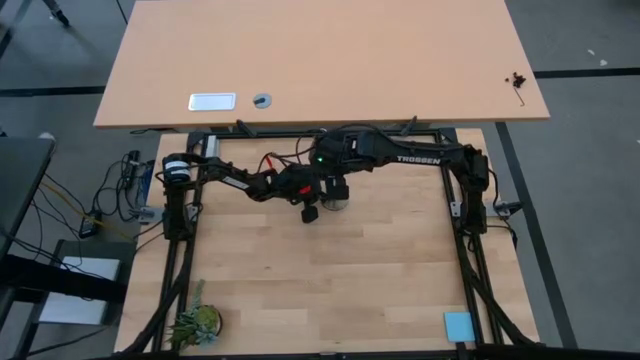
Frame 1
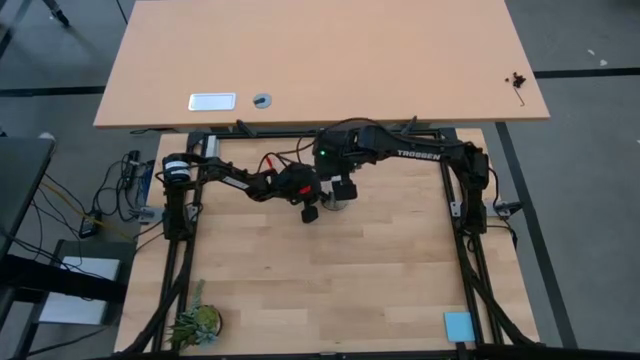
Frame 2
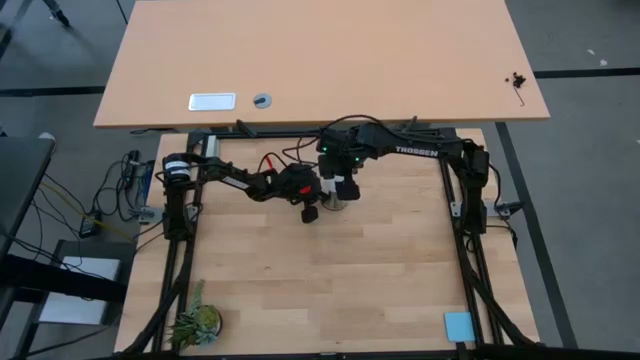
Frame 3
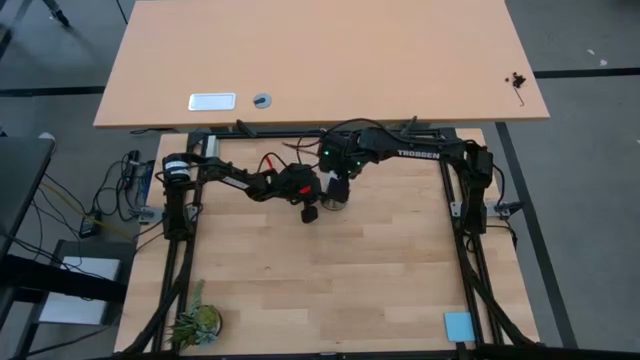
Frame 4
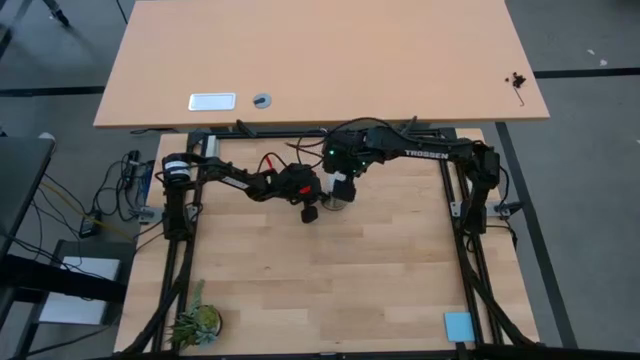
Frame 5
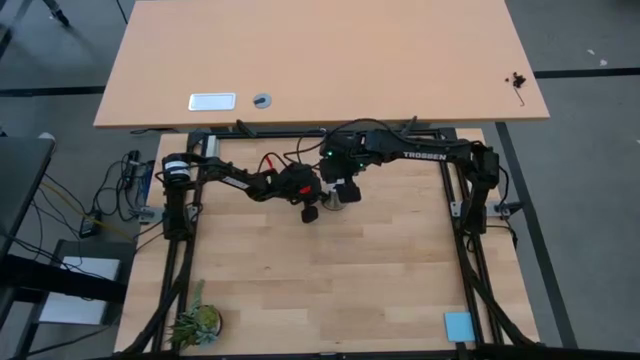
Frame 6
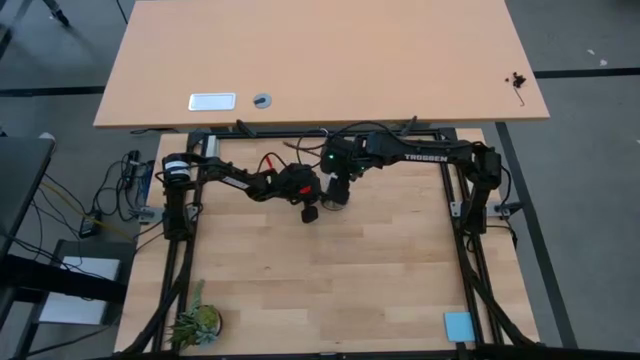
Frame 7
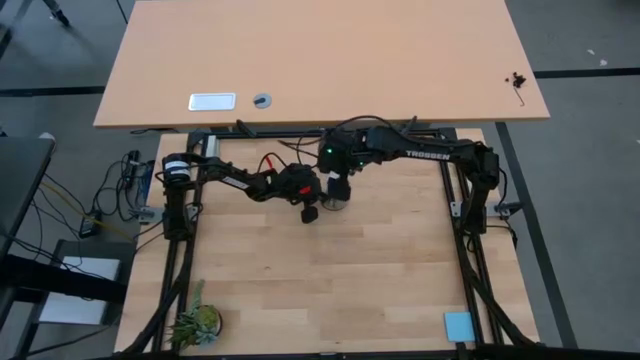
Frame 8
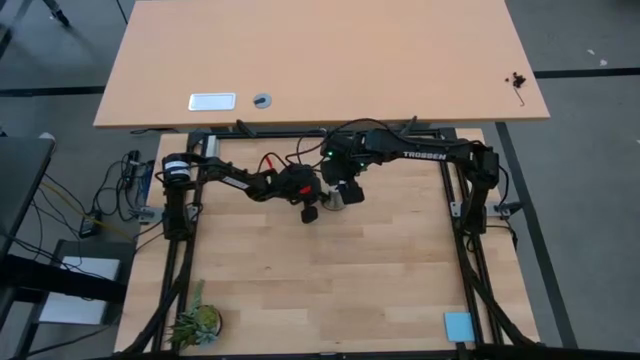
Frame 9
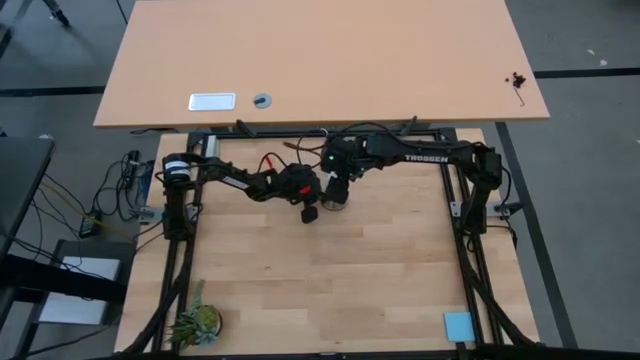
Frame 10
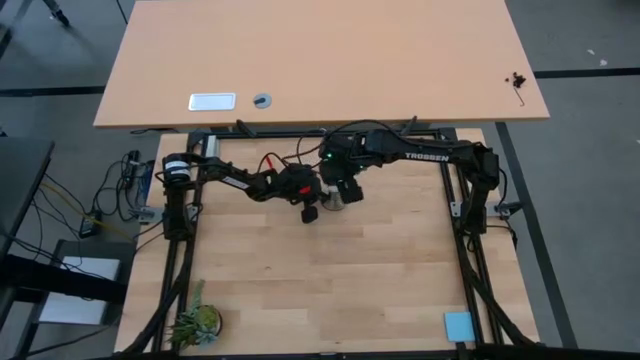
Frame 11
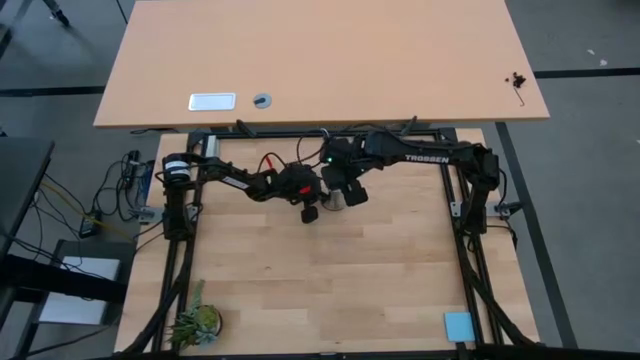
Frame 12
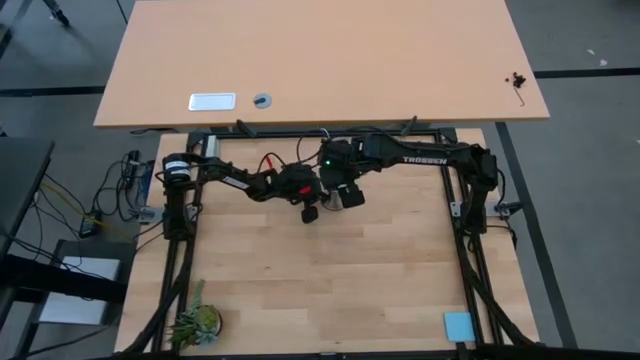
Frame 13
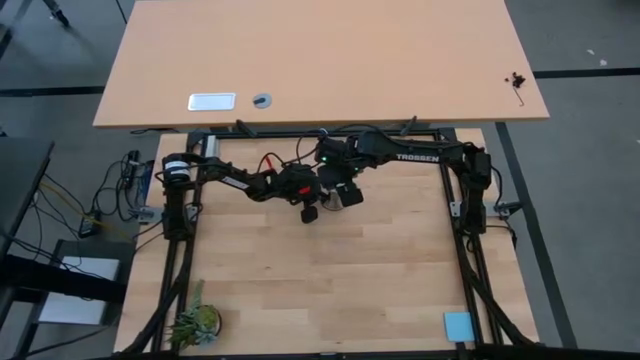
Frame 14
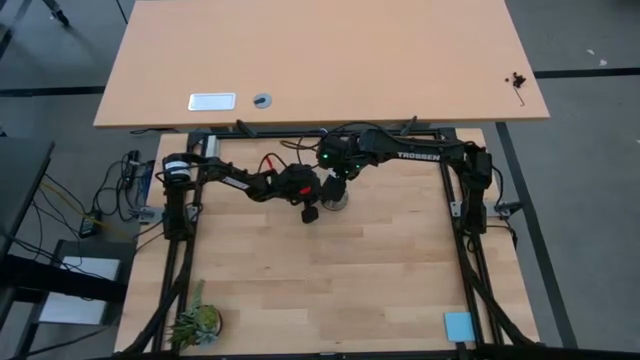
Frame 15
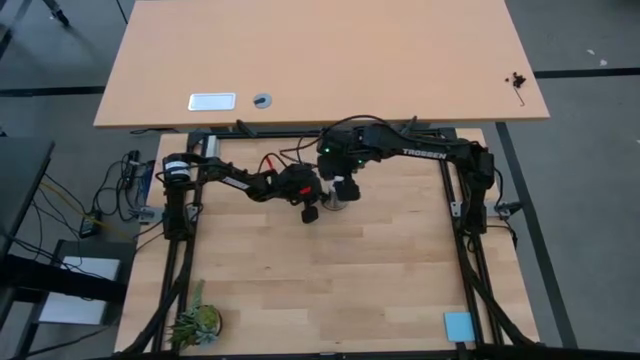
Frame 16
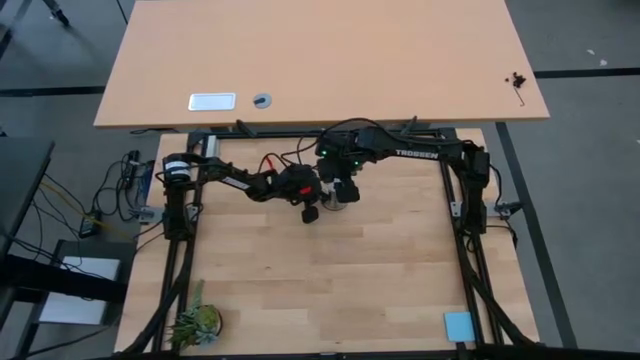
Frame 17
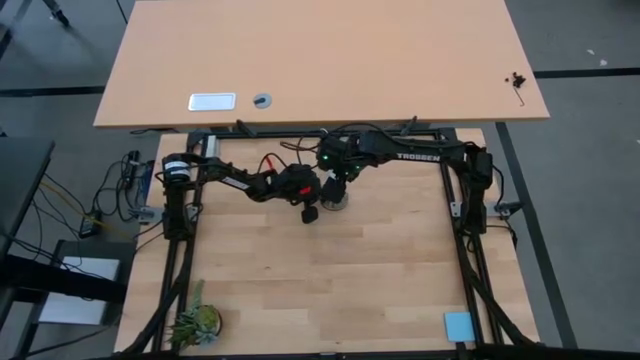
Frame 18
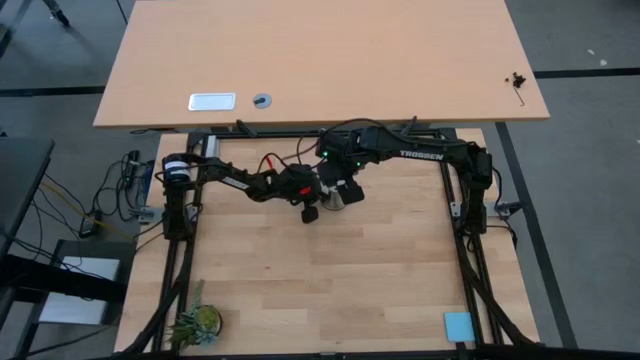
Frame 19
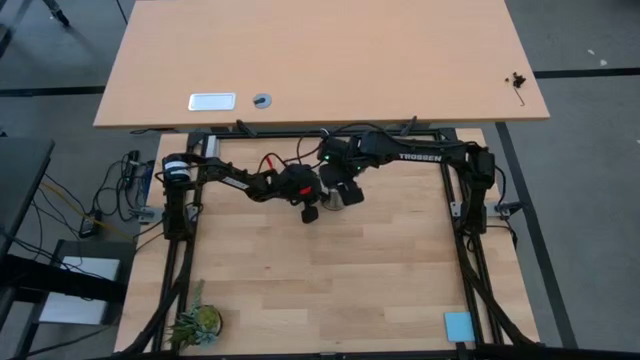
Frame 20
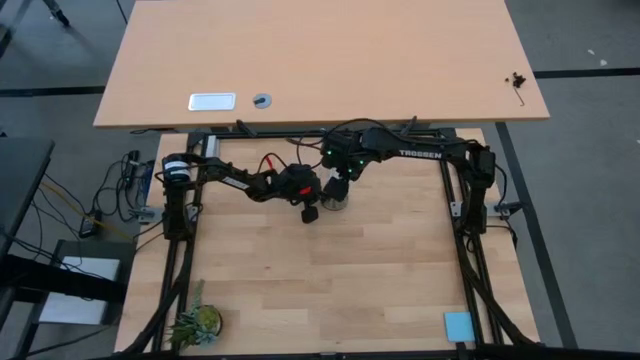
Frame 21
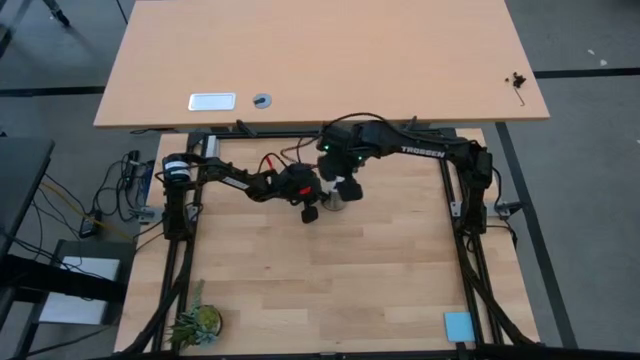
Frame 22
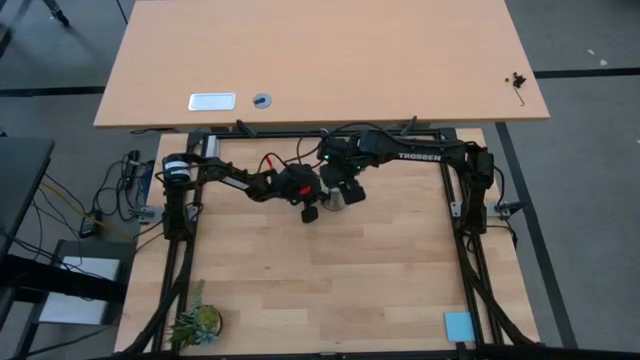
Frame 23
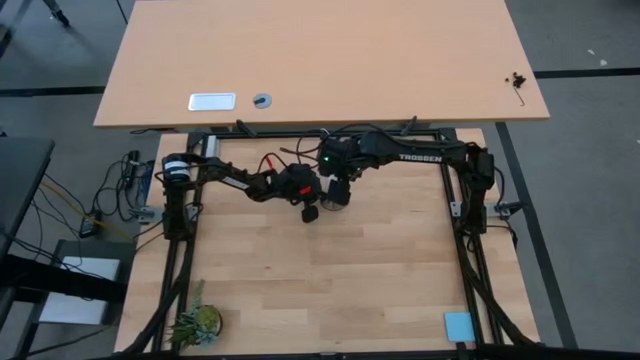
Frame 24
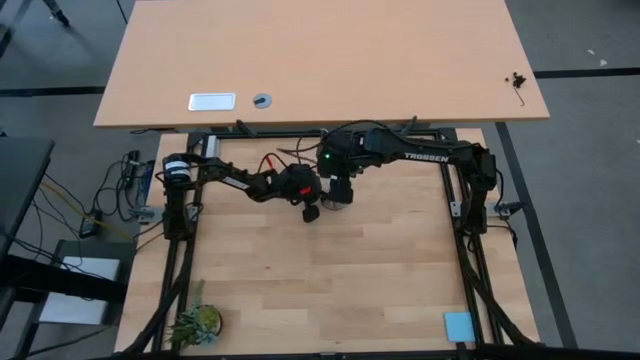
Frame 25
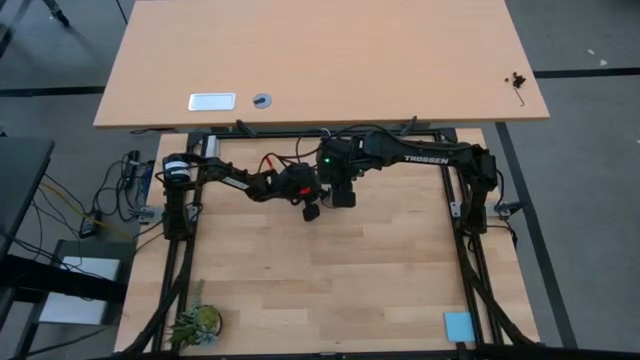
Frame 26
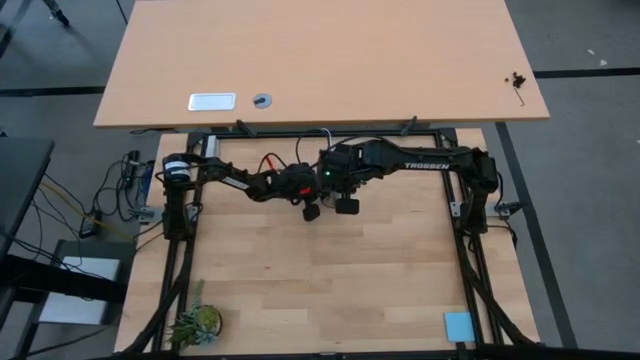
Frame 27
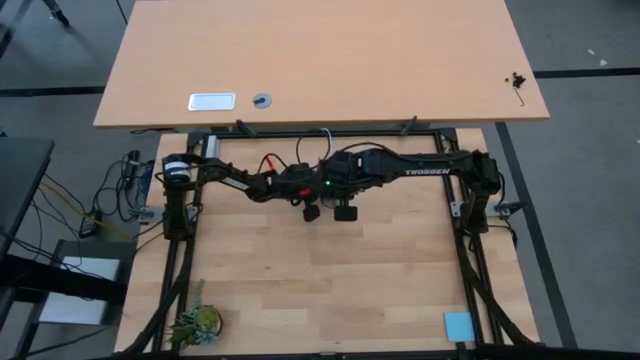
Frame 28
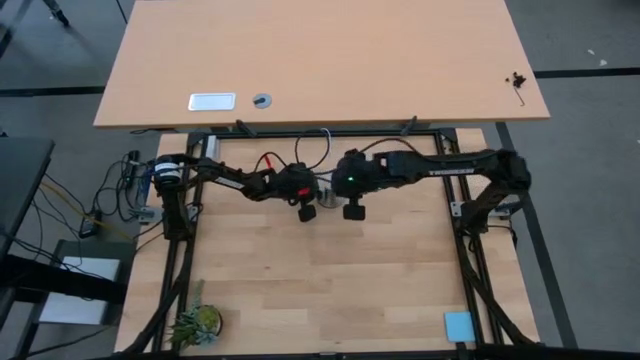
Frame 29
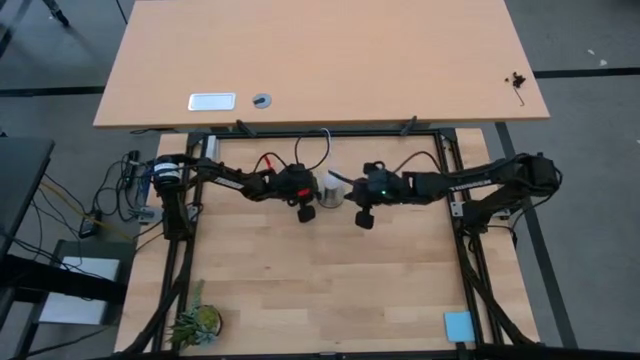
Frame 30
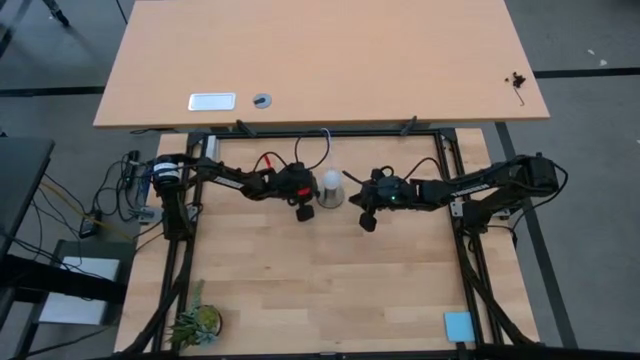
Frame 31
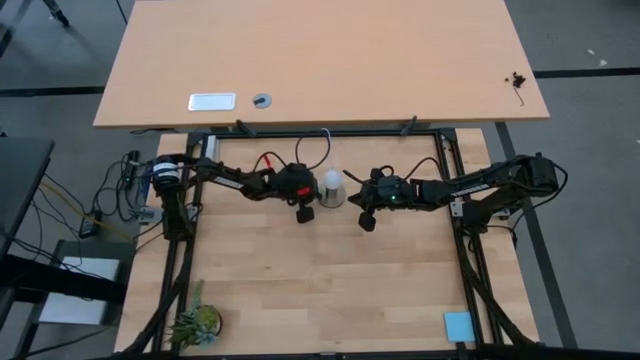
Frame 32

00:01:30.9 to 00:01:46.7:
Task: Screw lightbulb
Insert the white lightbulb into the gold lamp

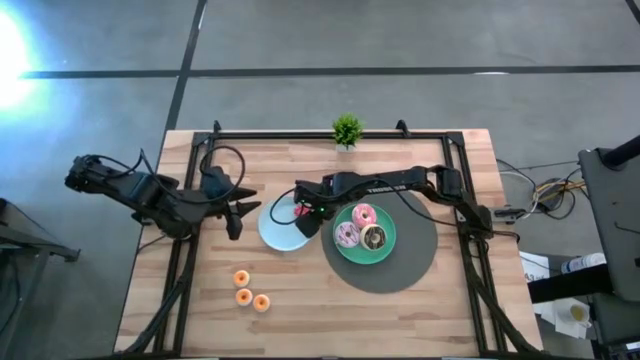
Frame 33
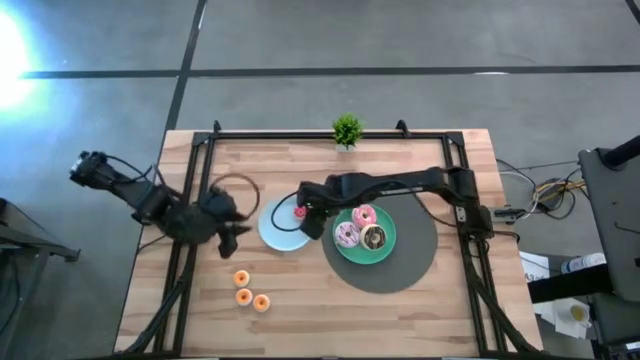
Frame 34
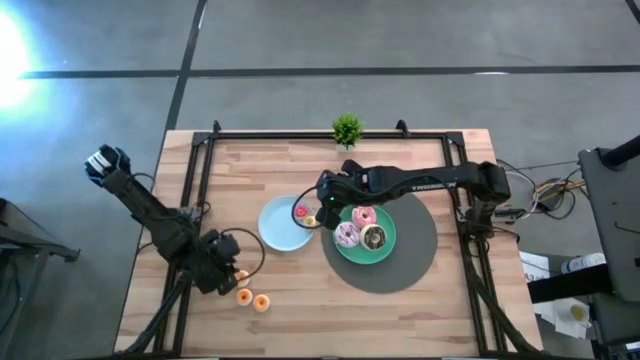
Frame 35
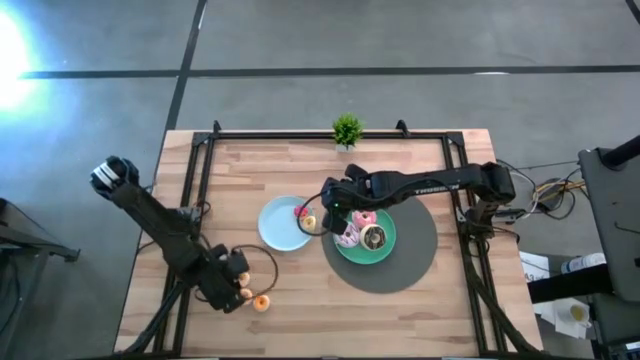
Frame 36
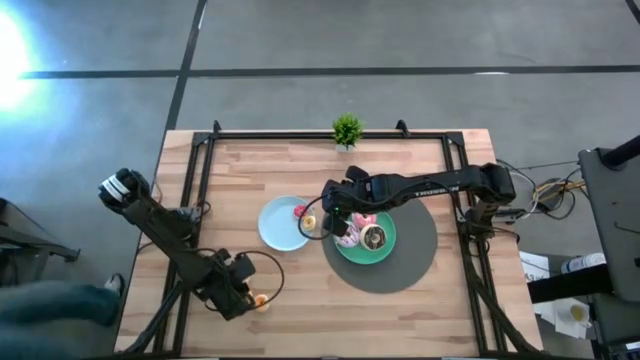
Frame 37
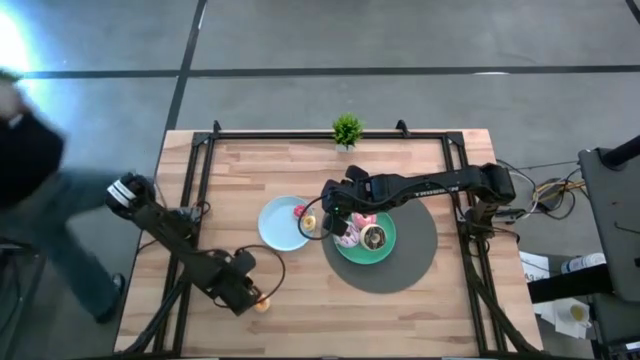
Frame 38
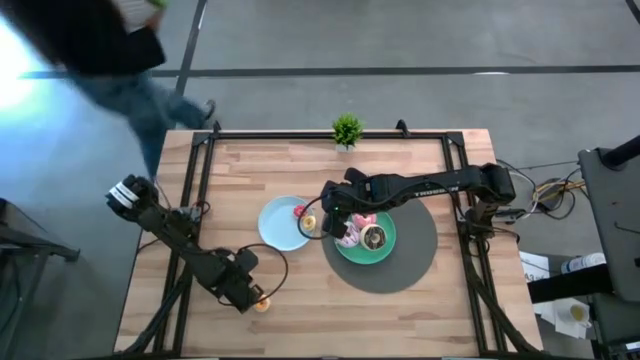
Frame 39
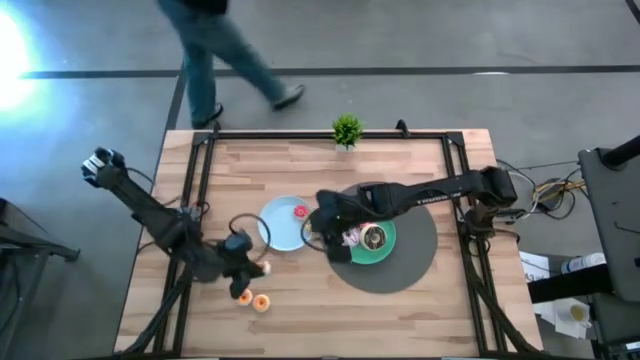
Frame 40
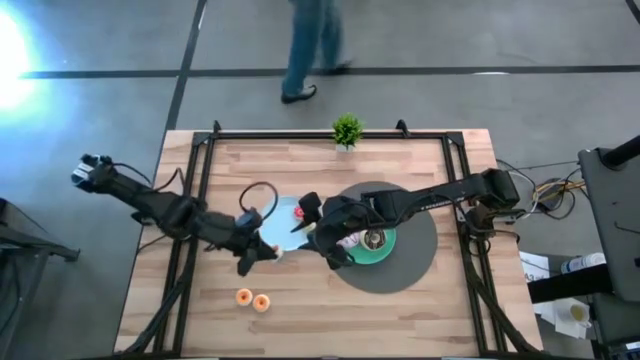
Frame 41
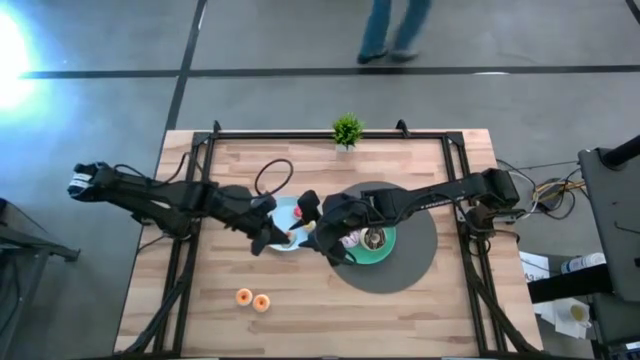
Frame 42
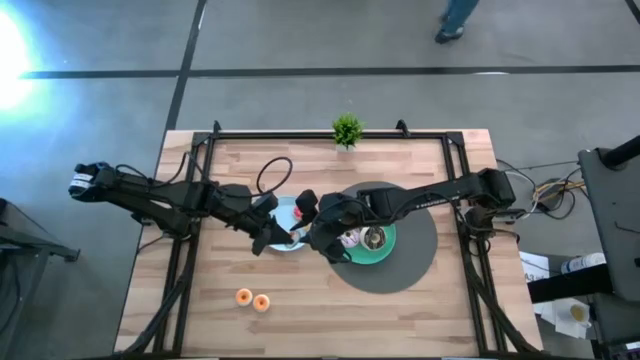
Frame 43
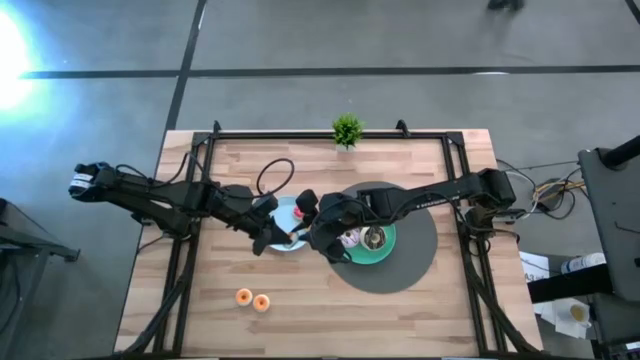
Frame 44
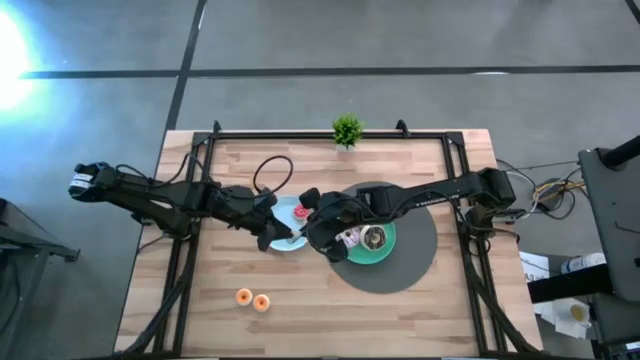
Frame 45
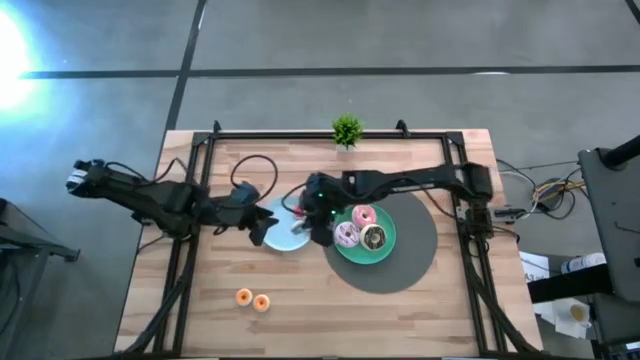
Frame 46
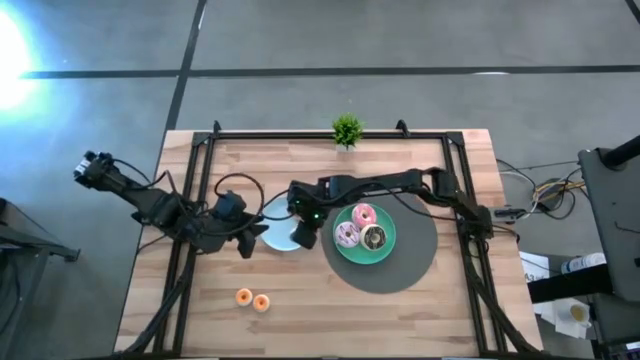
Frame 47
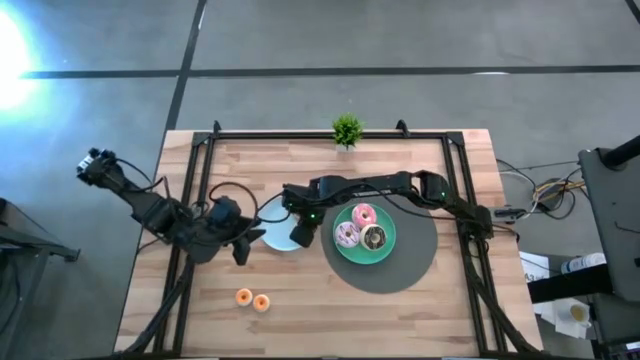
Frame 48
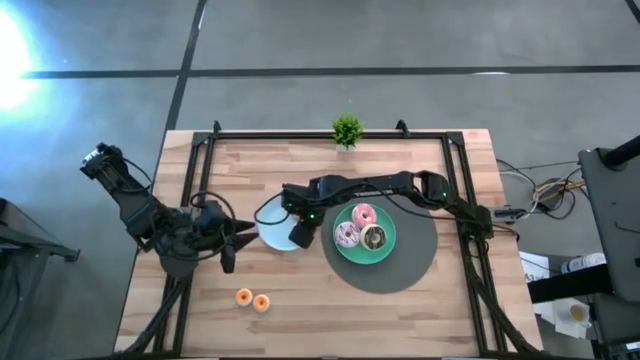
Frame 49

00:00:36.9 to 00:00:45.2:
Task: Pick & Place donuts
Put the small blue donut on the light blue plate
